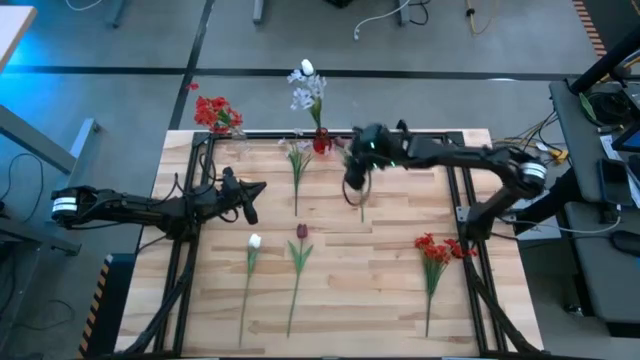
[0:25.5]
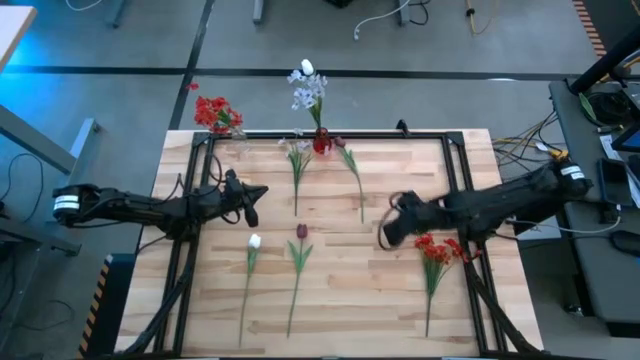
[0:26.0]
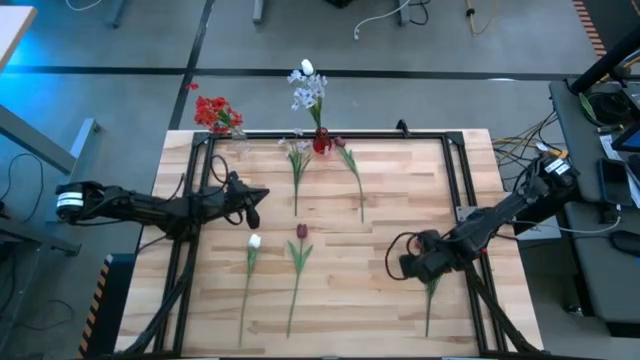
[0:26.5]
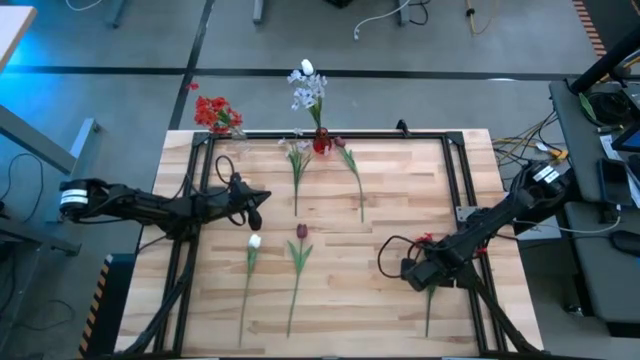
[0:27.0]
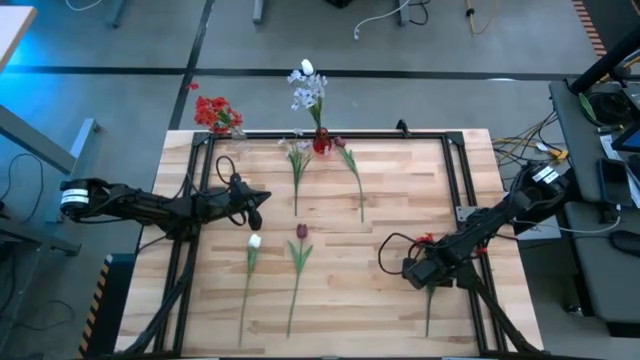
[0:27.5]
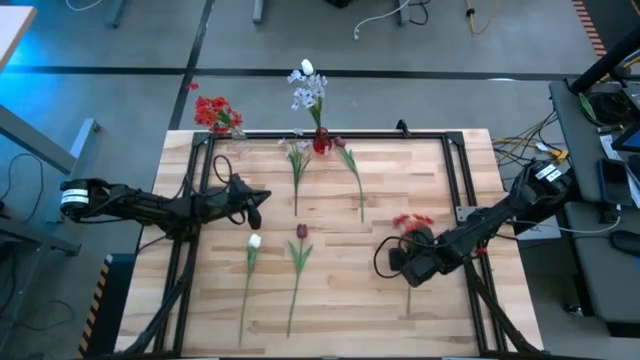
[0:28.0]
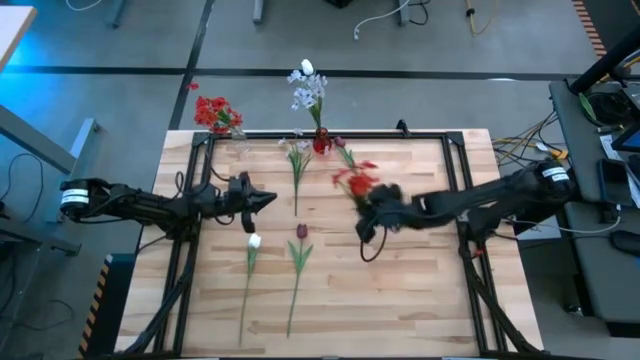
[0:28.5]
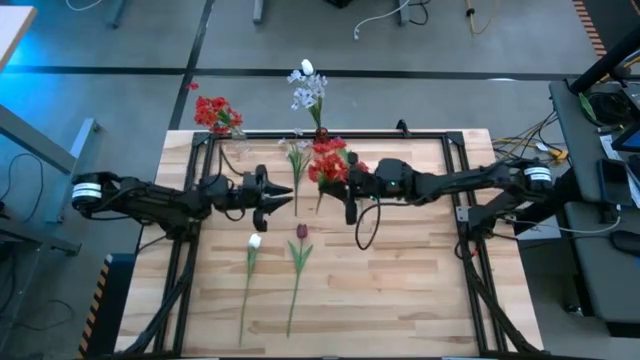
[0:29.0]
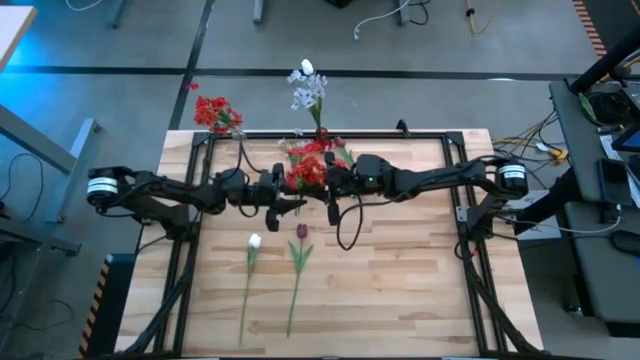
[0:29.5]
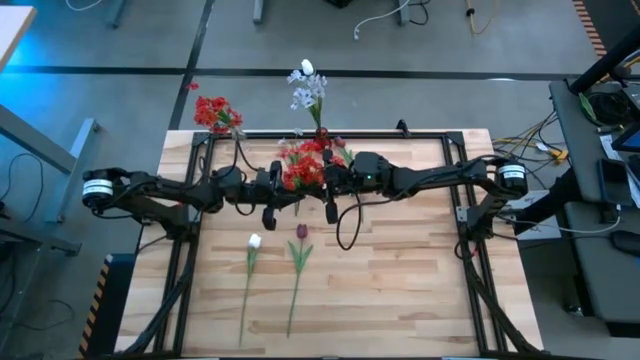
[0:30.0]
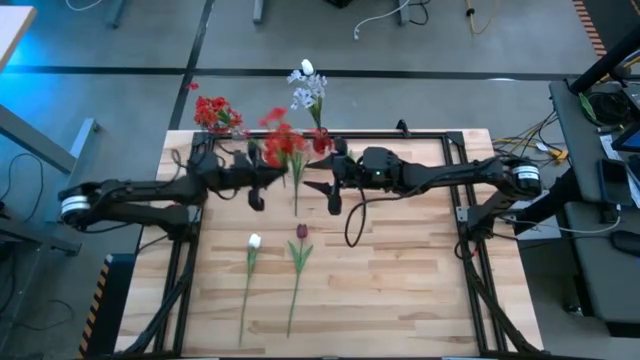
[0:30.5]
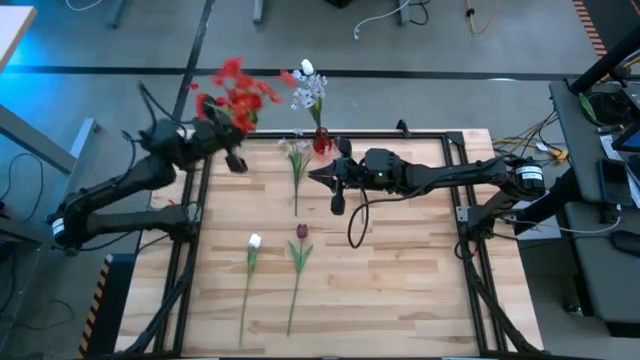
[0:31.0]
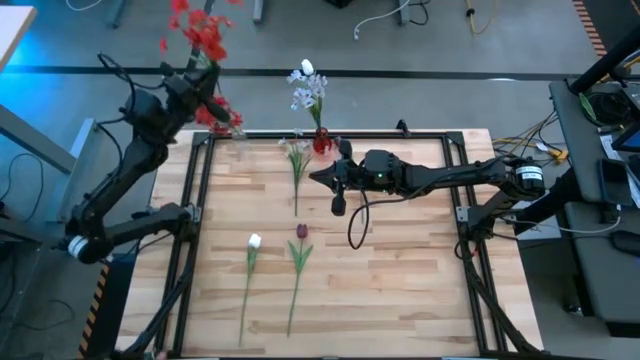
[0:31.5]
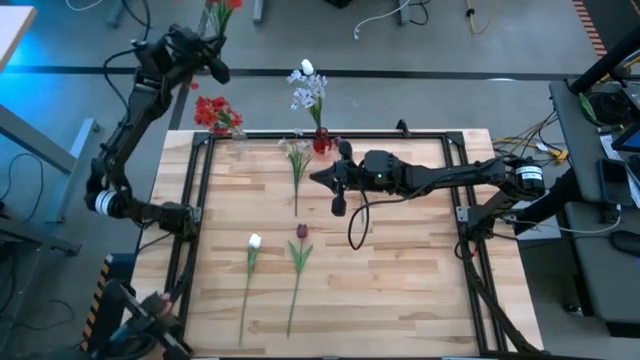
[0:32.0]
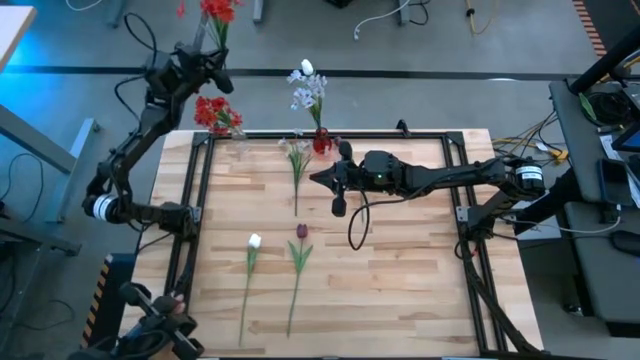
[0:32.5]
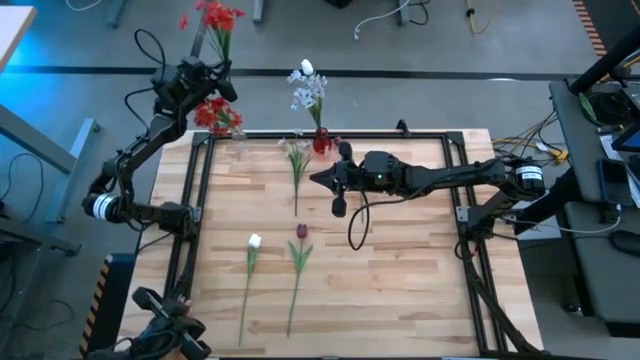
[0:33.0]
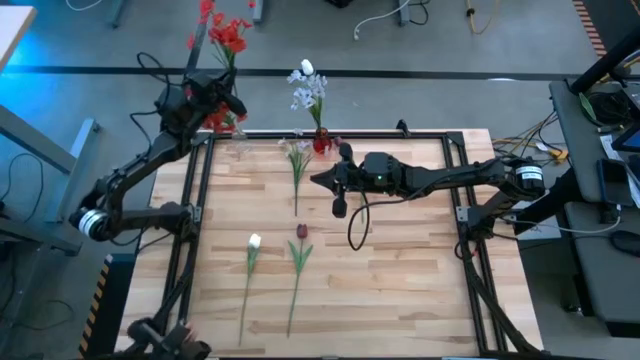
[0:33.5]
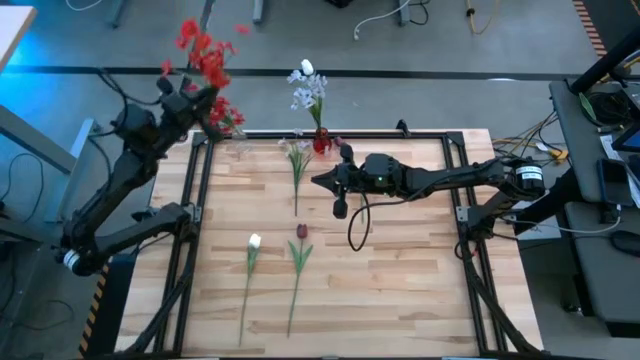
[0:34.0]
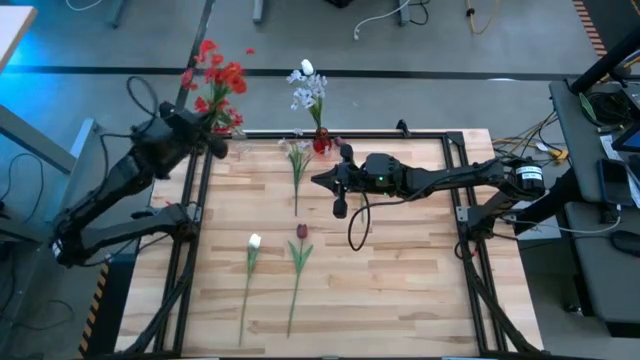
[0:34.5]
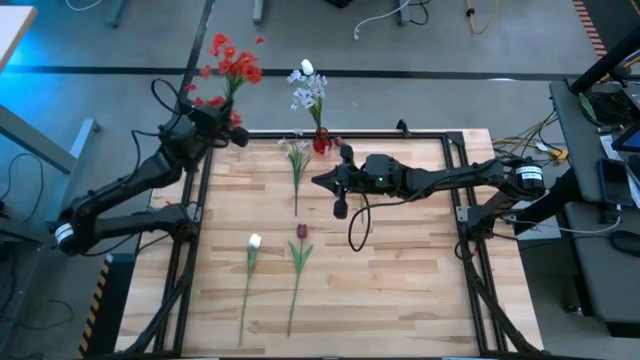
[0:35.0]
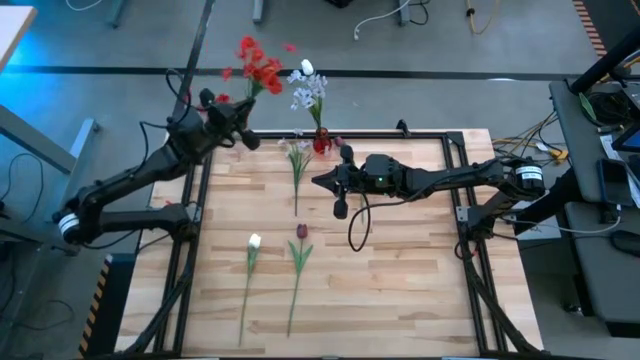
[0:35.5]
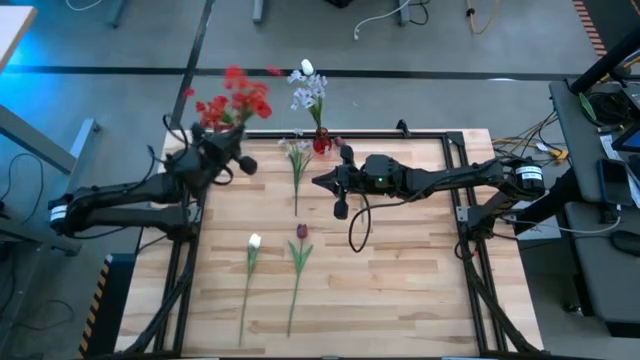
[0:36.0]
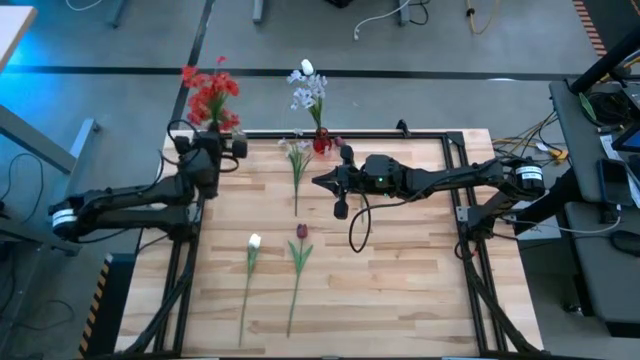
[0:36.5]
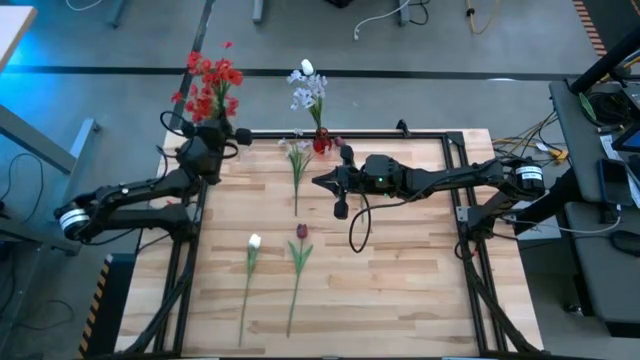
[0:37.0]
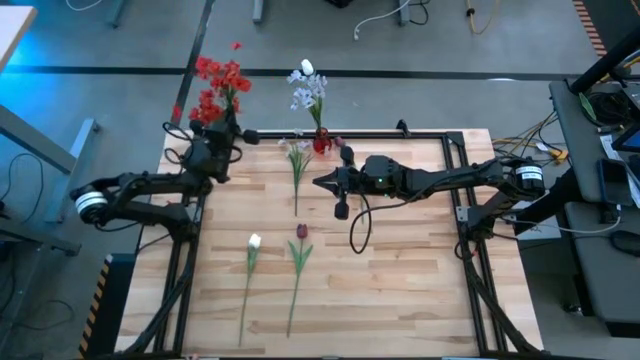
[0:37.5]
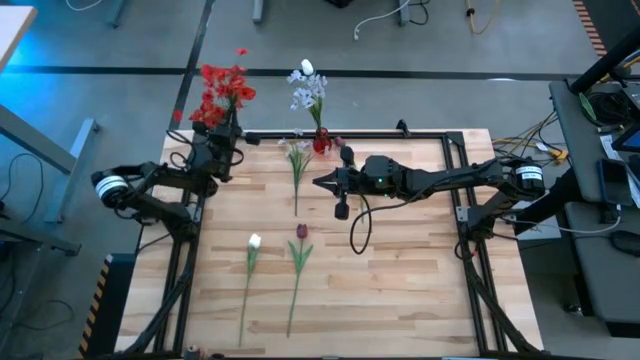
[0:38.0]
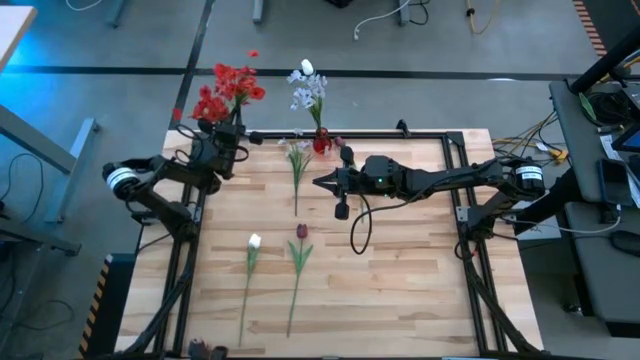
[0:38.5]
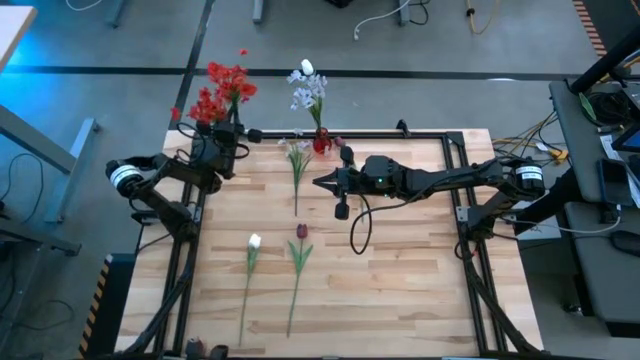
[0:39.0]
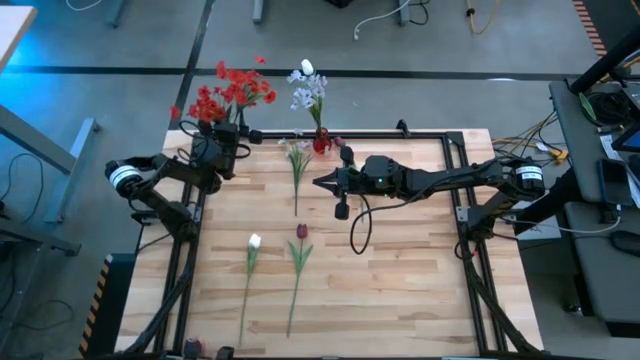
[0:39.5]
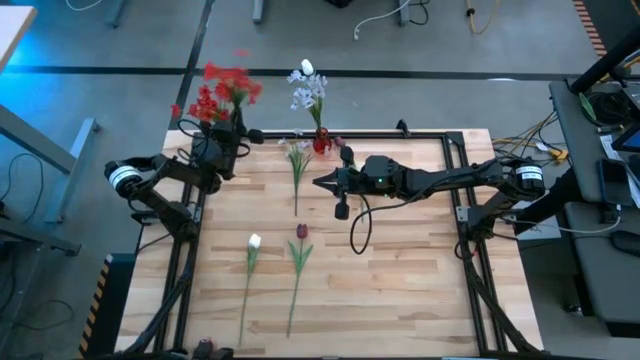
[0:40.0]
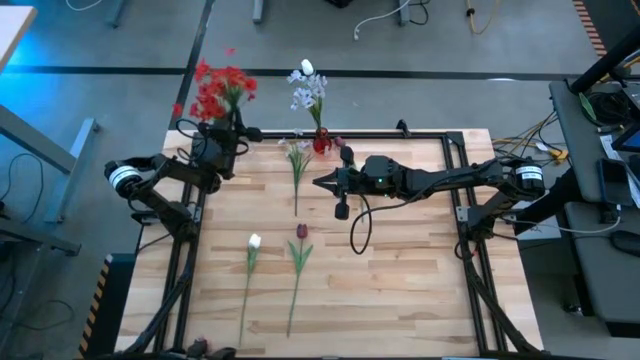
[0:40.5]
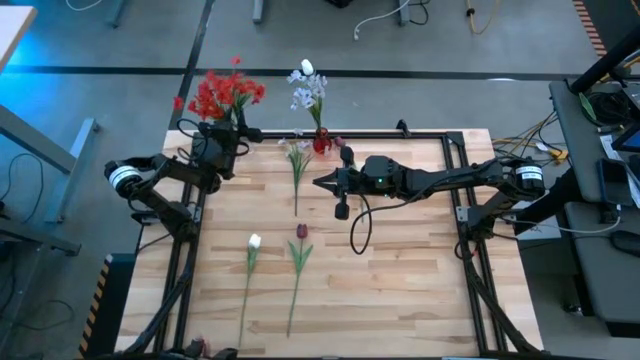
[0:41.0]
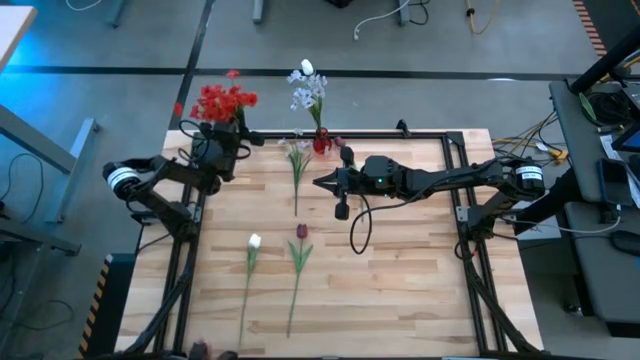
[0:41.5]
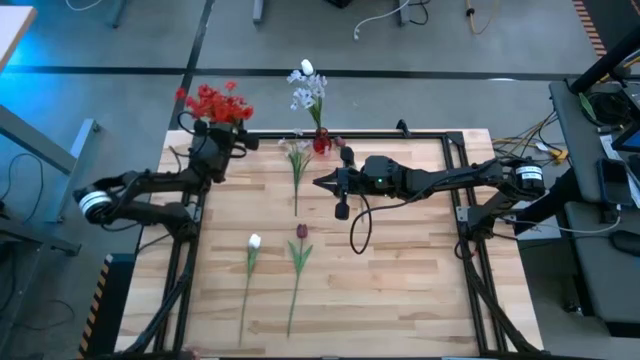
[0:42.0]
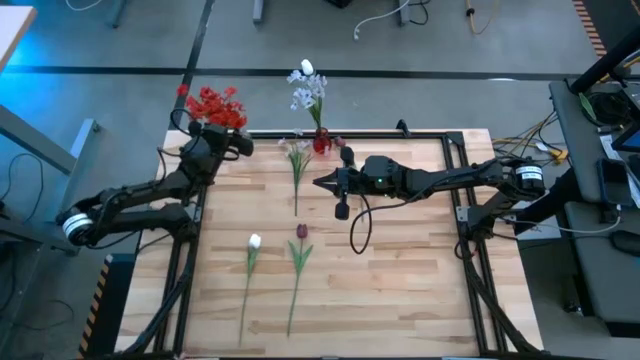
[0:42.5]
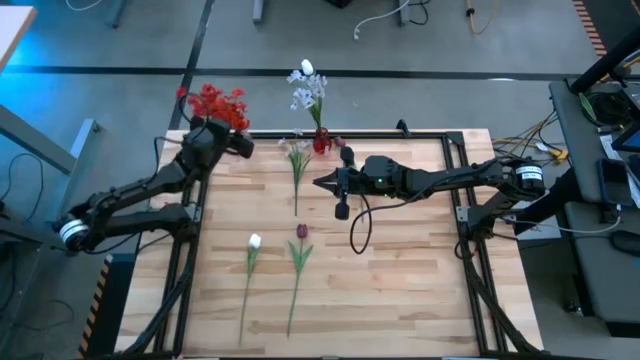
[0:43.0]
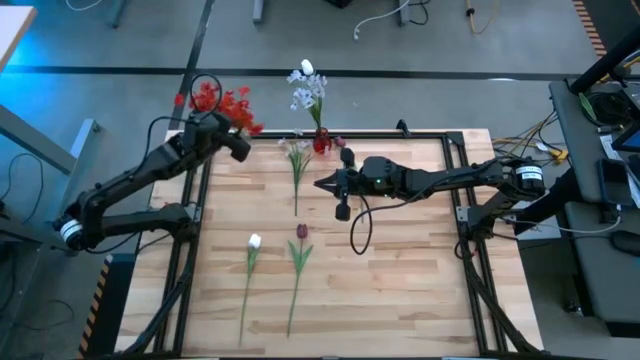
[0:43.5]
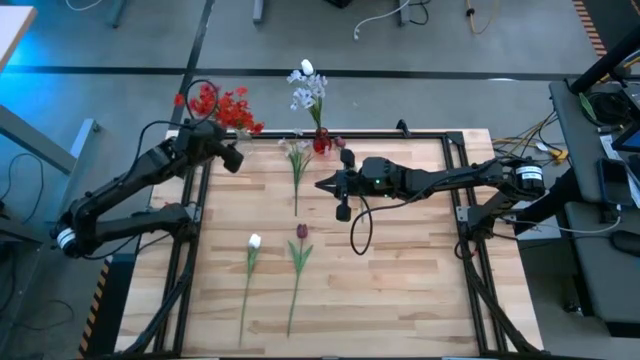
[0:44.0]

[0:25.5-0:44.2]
Task: Sort flowers into vase by color
Put the red flowers into the transparent vase

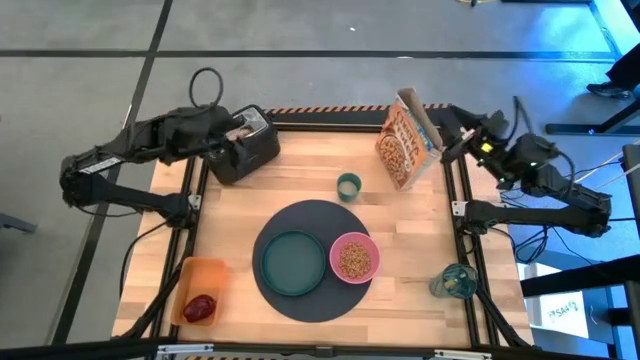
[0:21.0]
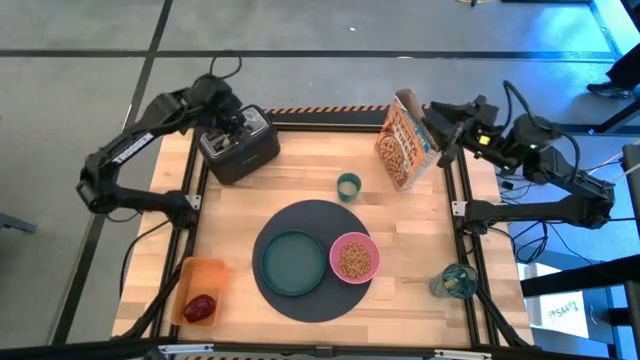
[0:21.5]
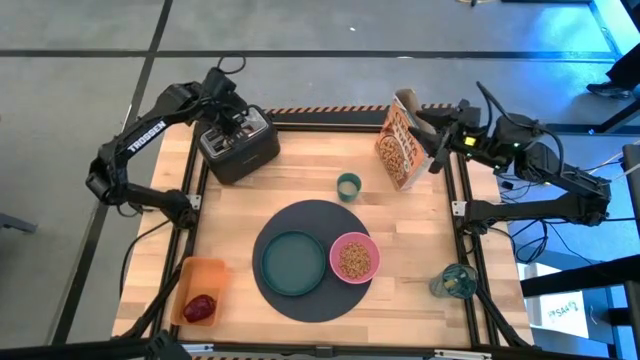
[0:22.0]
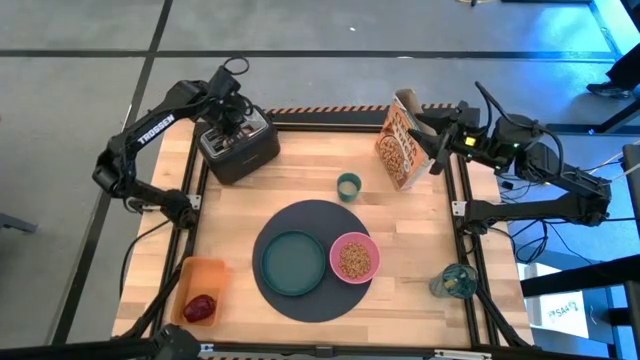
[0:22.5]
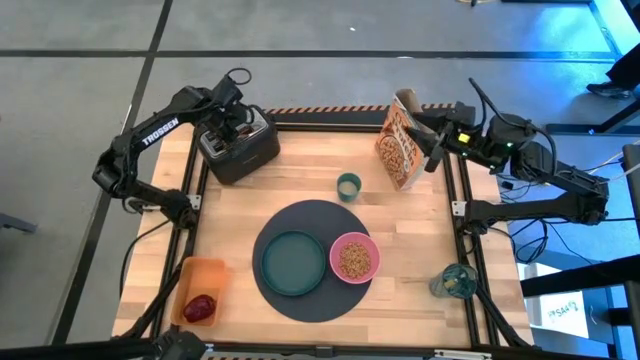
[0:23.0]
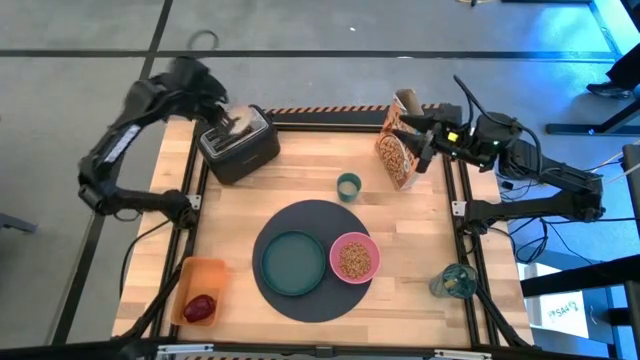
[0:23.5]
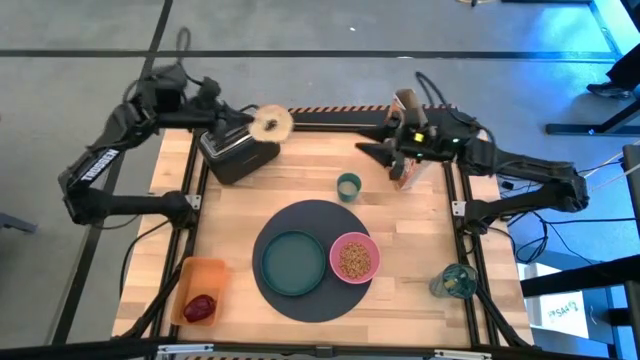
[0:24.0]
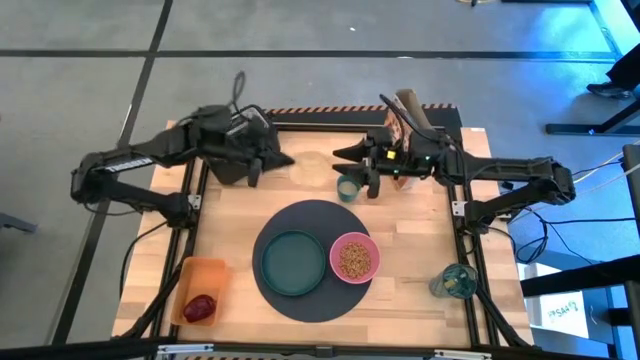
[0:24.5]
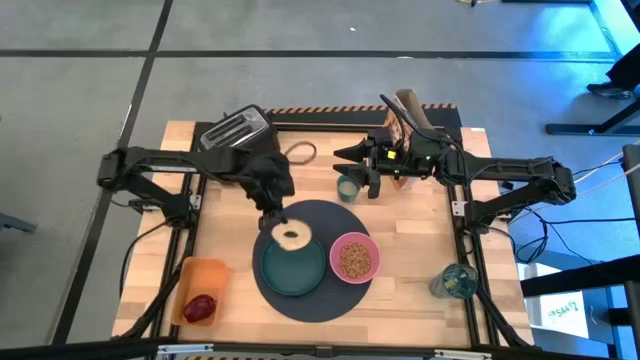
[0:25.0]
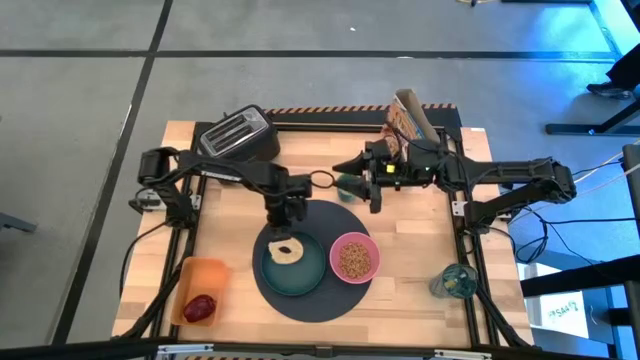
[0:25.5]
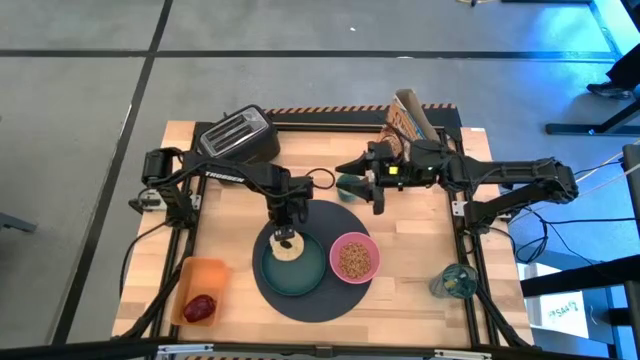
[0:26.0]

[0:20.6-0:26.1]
Task: Arrange a breakfast setting
Put the toasted bread from the bread toaster on top of the green plate on the placemat
